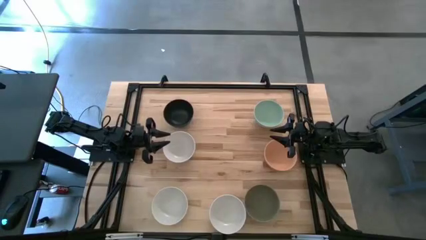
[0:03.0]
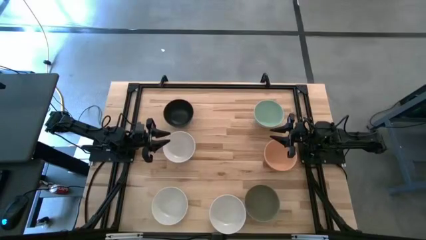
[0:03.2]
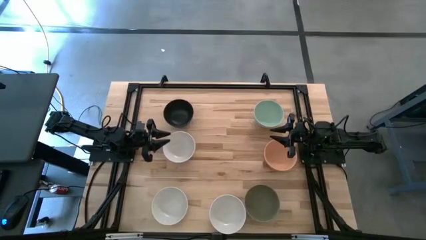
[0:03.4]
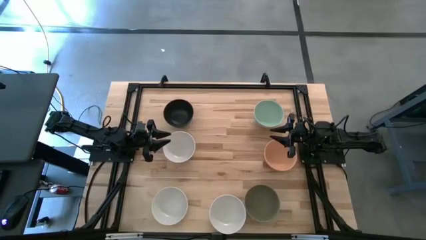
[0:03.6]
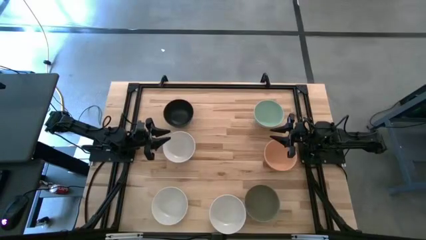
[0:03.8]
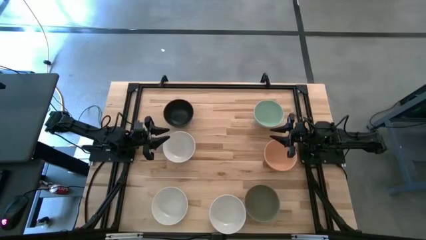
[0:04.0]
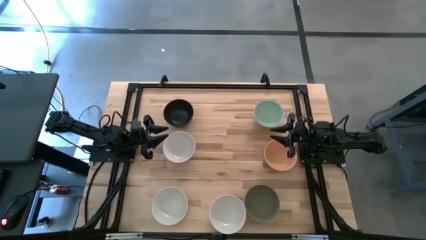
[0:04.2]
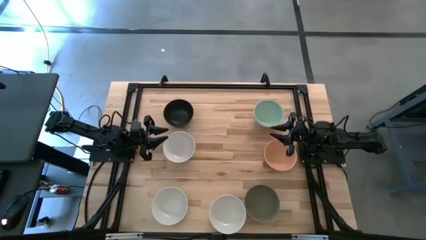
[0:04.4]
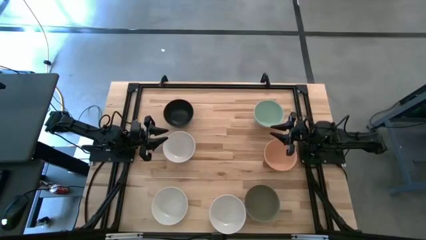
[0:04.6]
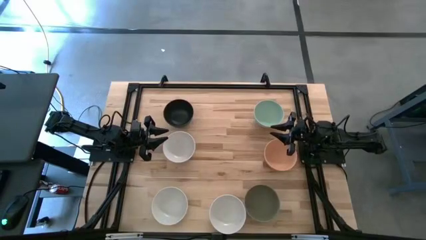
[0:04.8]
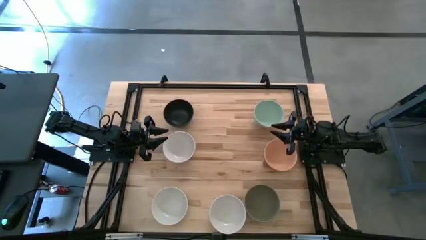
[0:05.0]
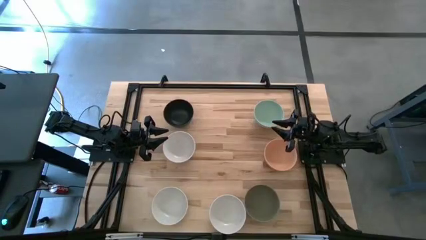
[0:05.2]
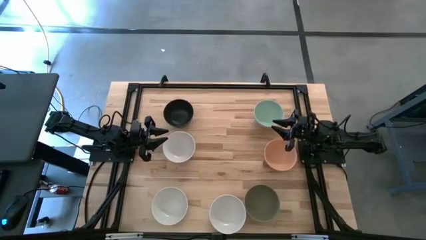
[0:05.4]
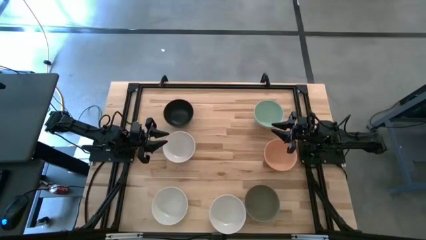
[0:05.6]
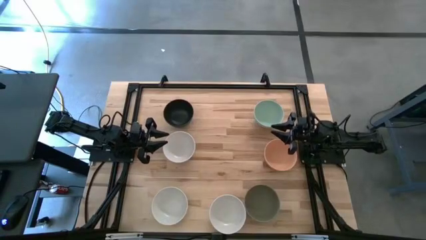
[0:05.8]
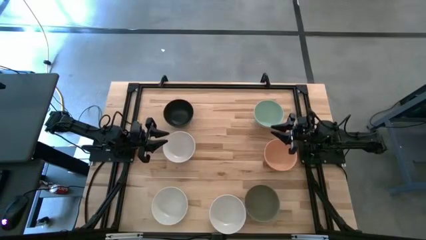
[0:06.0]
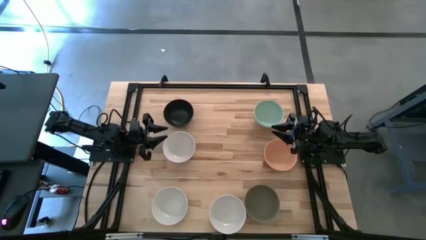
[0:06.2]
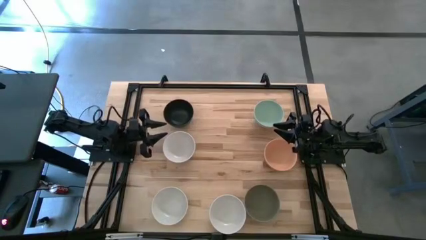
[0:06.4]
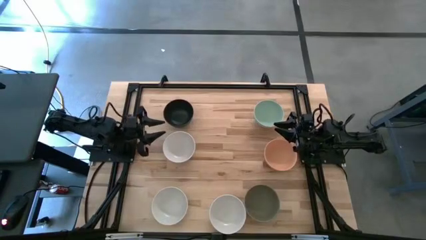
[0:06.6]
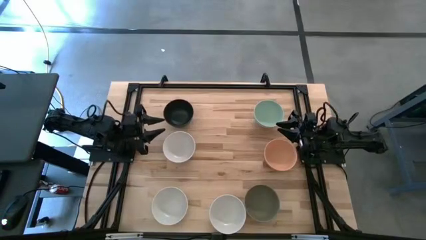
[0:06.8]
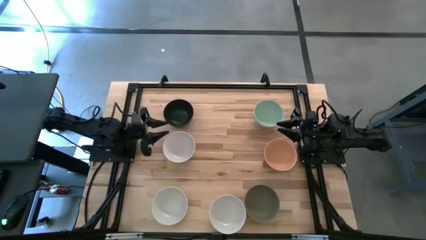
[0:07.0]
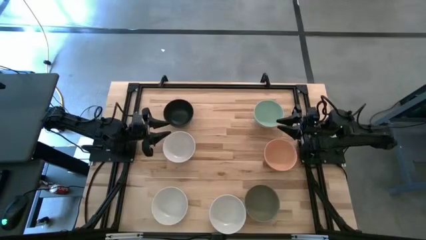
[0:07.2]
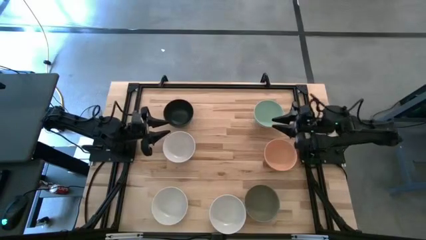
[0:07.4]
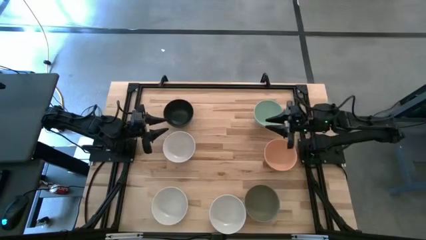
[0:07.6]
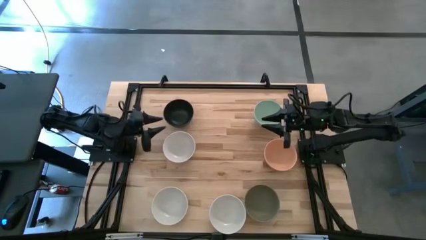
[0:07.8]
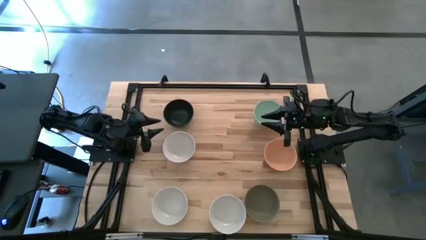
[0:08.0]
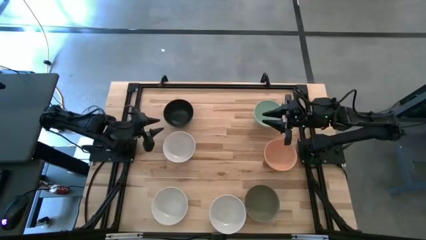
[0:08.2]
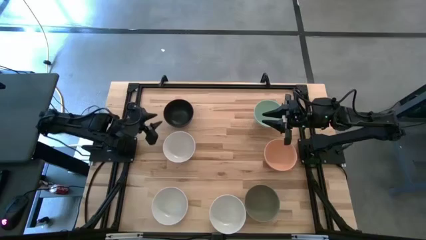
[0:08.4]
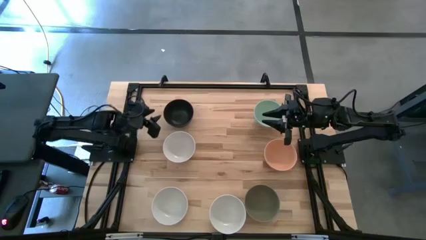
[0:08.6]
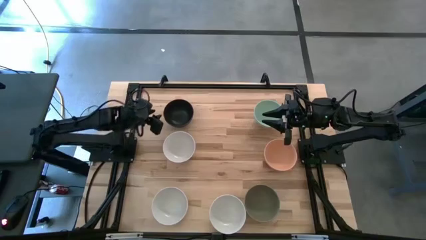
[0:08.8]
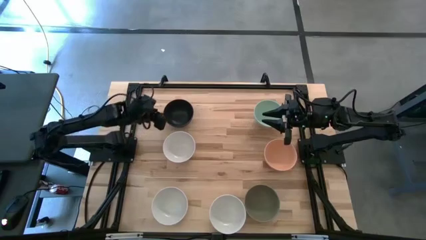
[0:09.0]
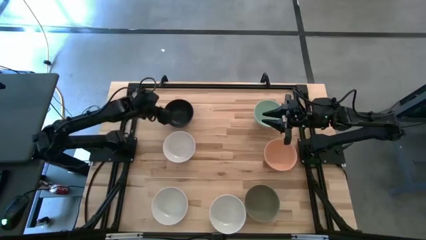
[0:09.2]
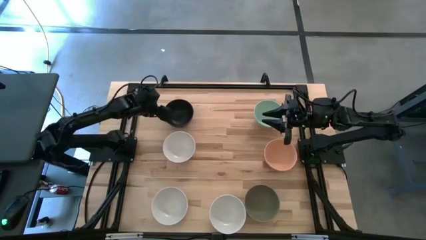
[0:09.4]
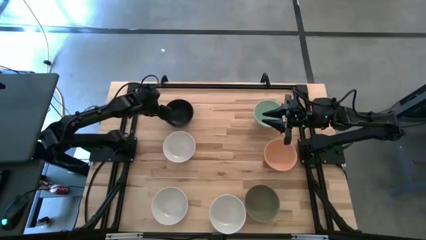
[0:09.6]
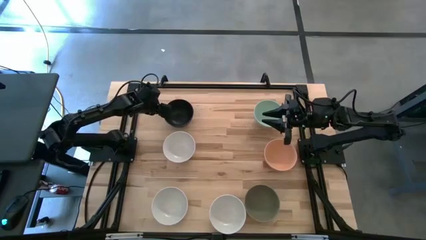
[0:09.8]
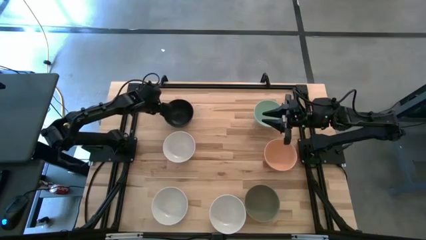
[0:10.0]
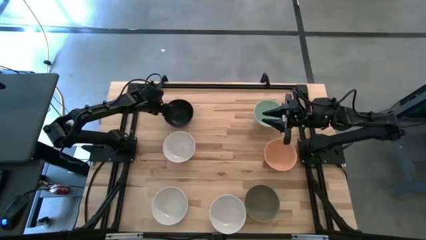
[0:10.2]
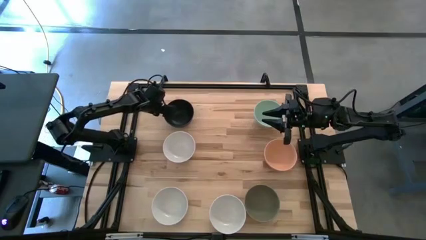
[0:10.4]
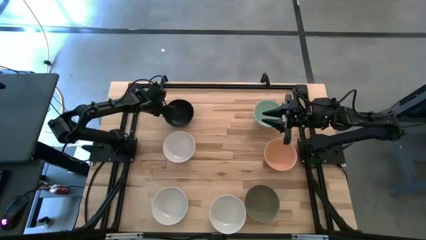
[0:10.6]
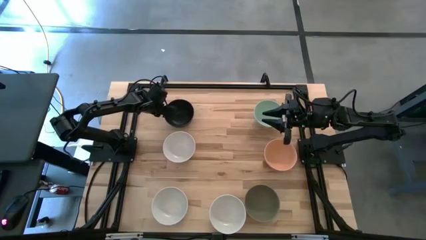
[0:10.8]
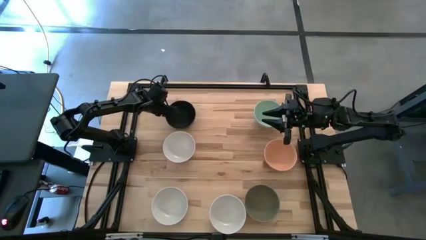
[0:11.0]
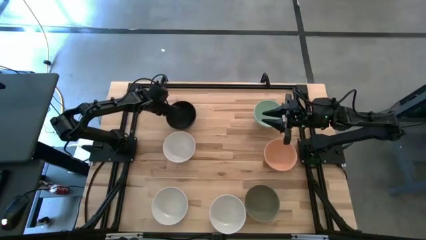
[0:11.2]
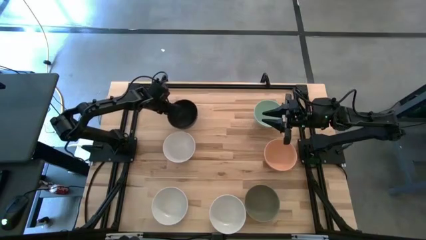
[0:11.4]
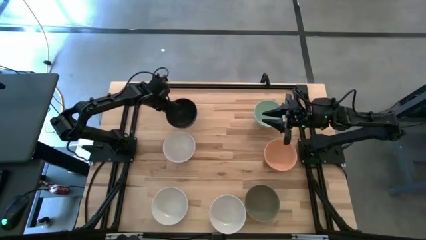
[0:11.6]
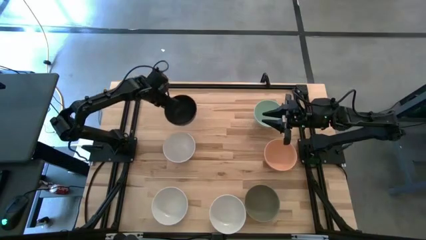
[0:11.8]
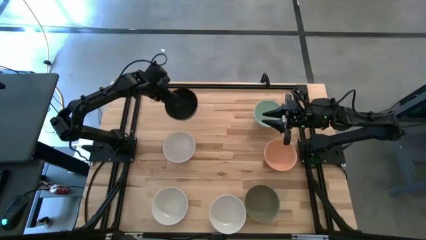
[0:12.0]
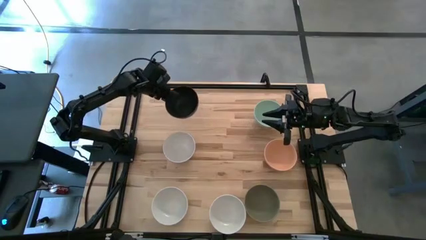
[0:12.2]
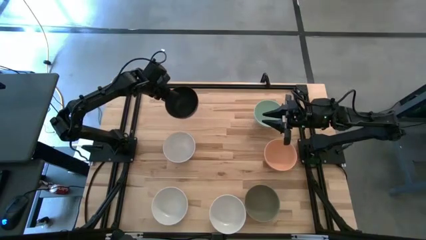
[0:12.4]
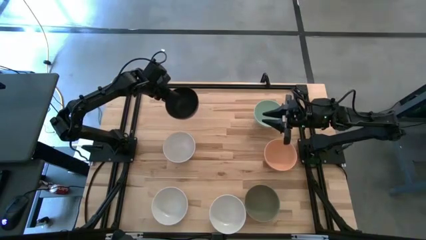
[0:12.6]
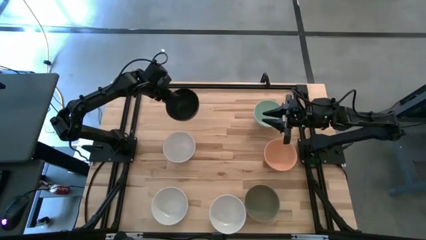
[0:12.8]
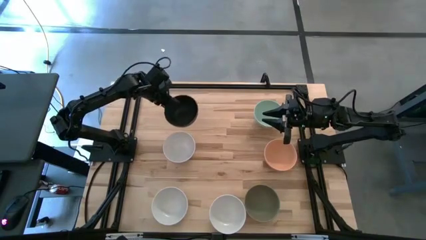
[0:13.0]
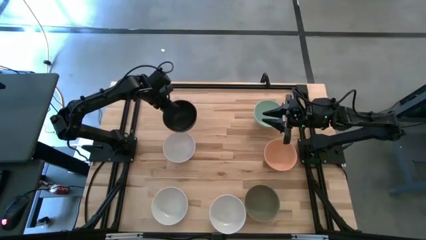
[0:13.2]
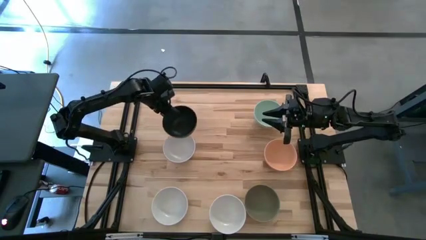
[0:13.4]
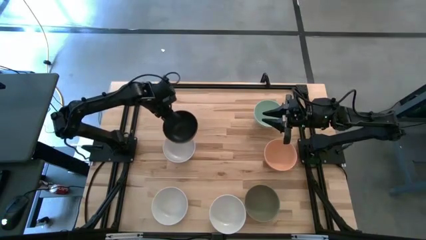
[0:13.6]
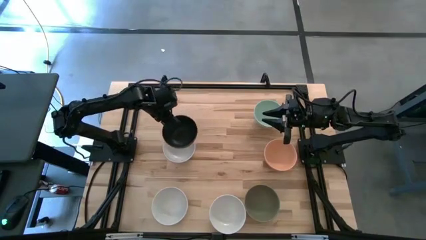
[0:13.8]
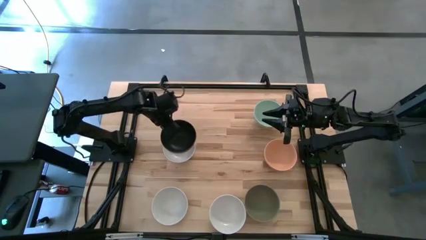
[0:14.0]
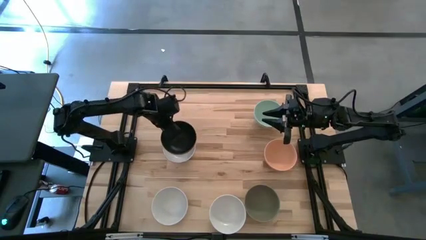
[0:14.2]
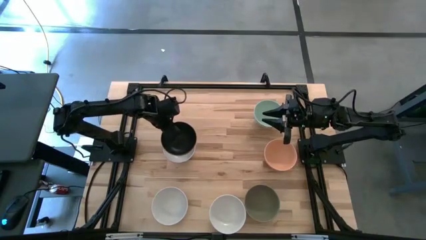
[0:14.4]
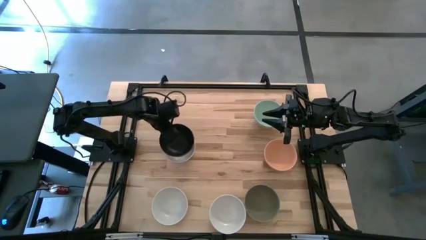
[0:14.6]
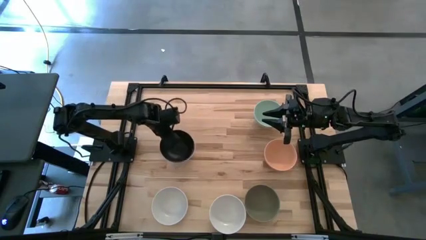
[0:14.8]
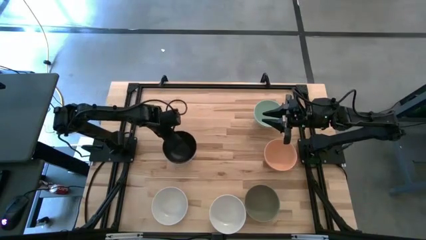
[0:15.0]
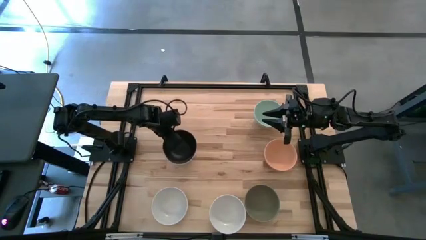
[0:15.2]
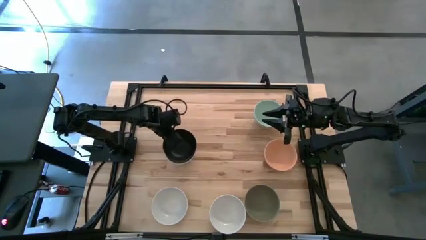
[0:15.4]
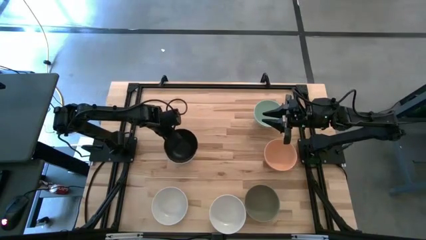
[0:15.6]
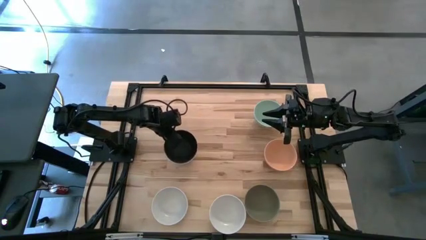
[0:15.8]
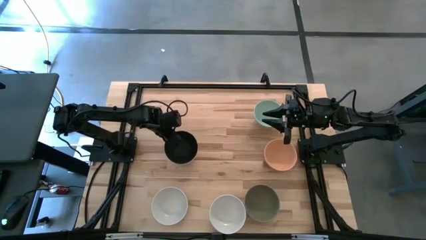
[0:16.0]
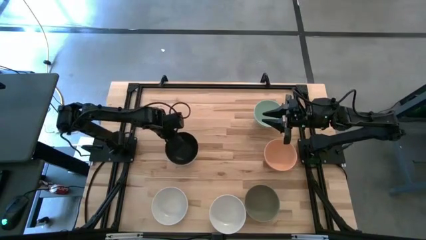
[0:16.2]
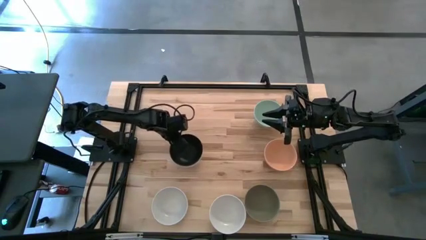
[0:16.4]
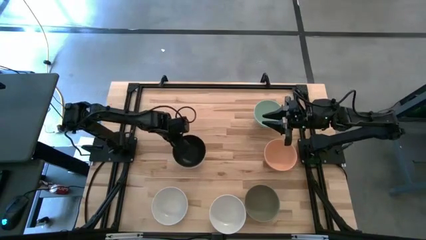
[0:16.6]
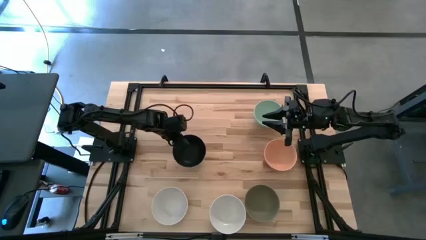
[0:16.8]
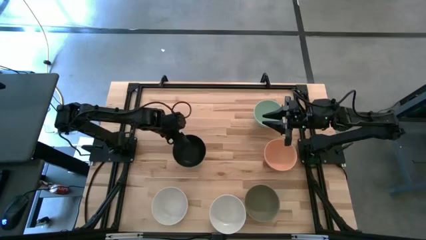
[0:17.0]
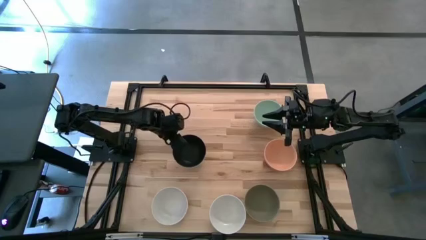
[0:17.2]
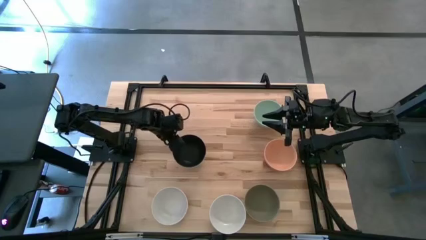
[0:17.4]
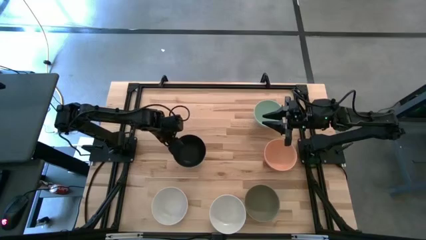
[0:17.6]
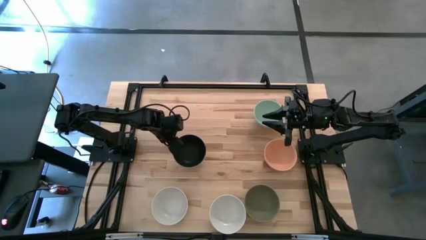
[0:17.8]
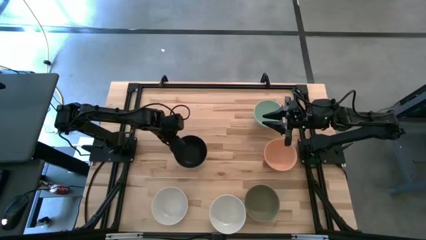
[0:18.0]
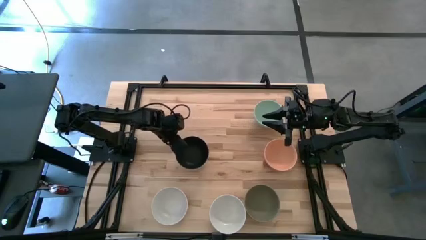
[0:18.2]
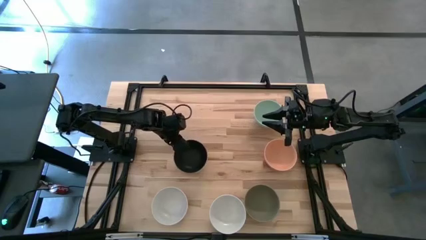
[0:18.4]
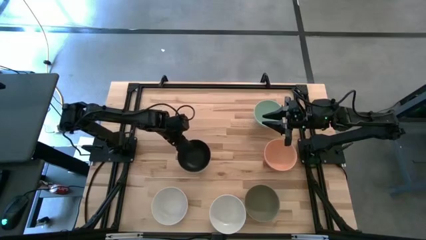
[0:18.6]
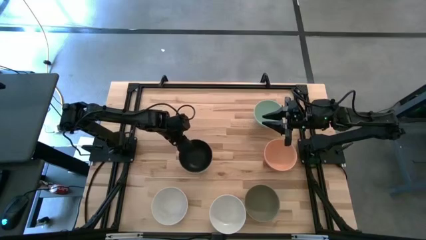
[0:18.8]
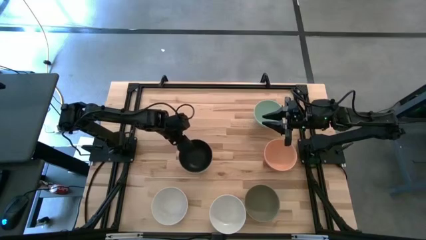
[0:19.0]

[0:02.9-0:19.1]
Task: Nest bowls inside each other
Stack the black bowl on the top left white bowl
